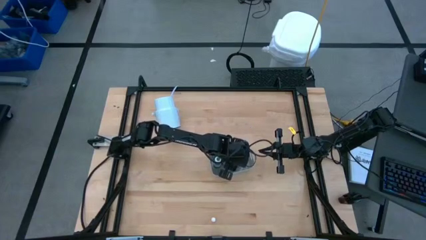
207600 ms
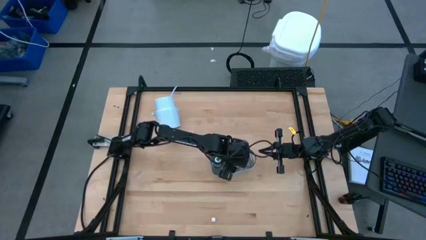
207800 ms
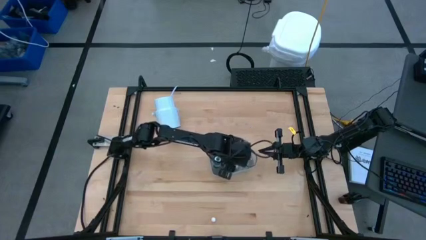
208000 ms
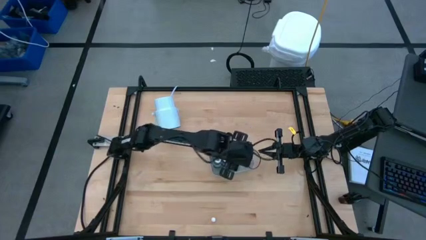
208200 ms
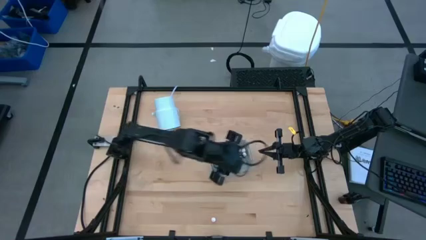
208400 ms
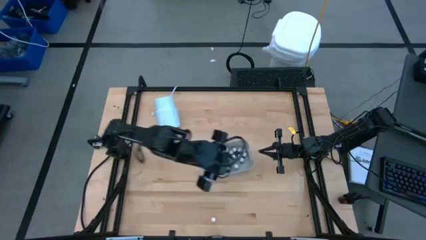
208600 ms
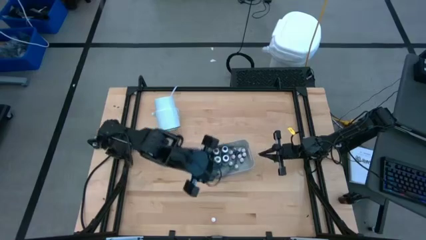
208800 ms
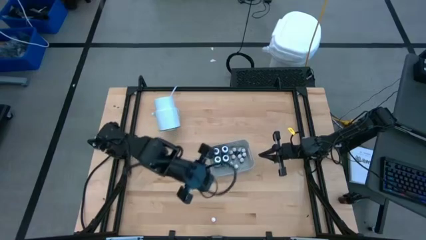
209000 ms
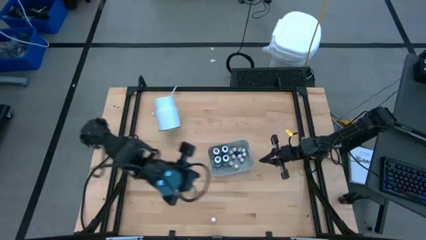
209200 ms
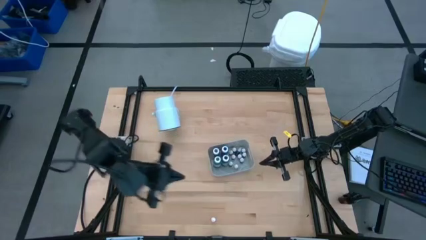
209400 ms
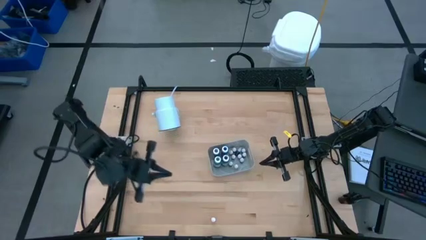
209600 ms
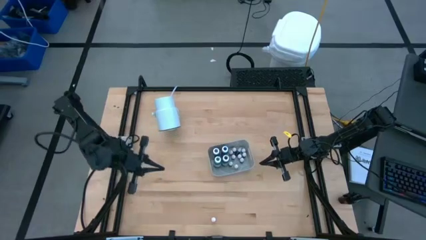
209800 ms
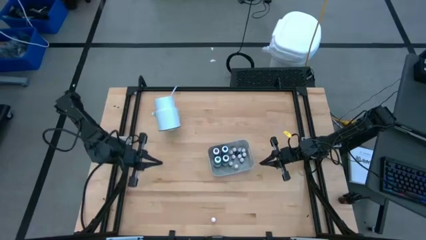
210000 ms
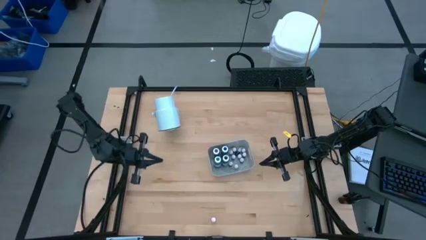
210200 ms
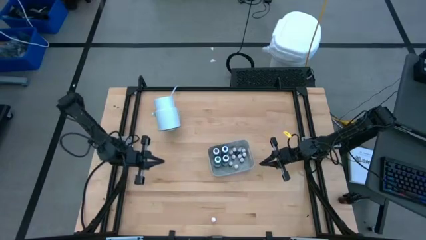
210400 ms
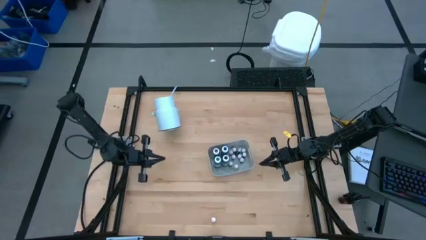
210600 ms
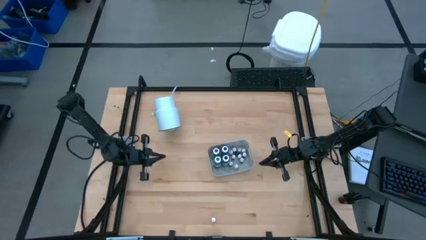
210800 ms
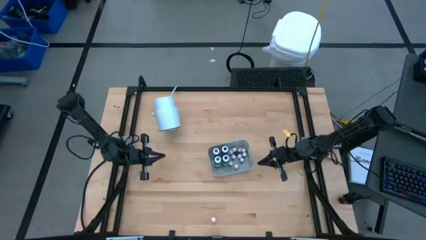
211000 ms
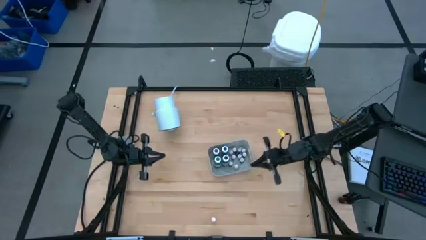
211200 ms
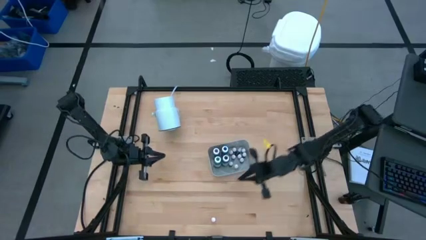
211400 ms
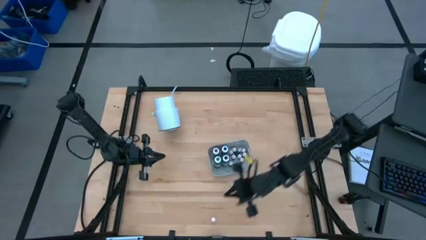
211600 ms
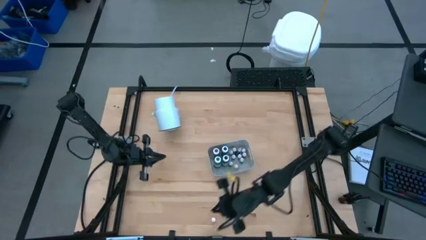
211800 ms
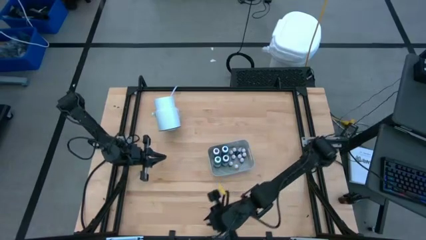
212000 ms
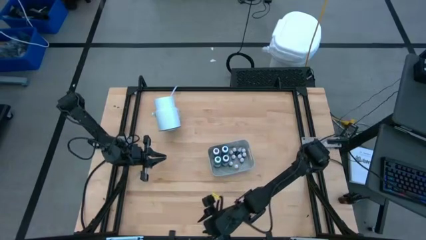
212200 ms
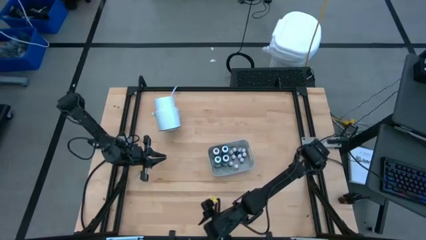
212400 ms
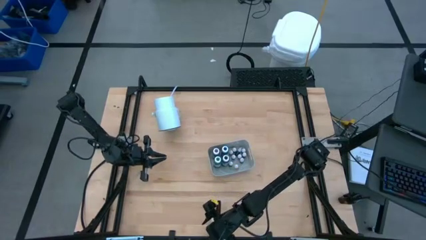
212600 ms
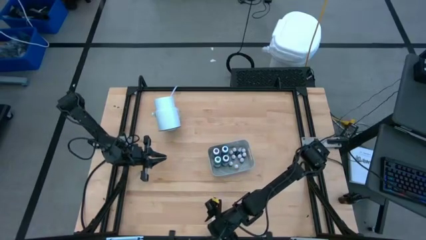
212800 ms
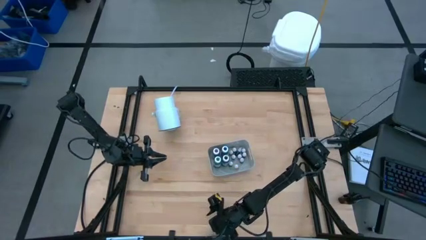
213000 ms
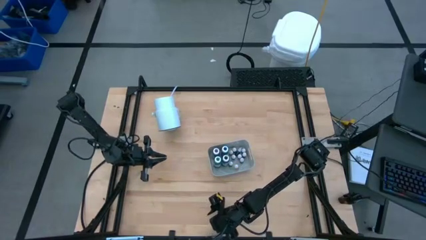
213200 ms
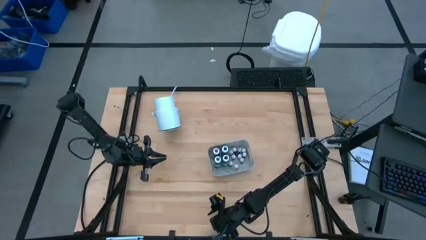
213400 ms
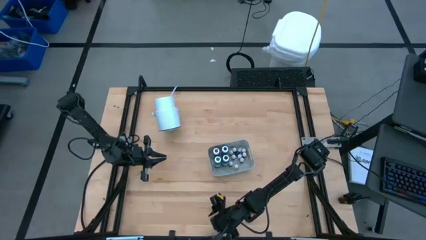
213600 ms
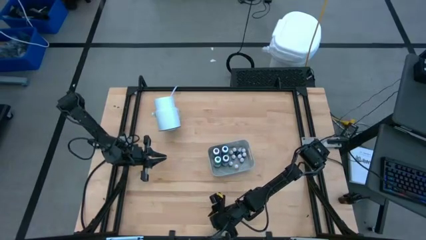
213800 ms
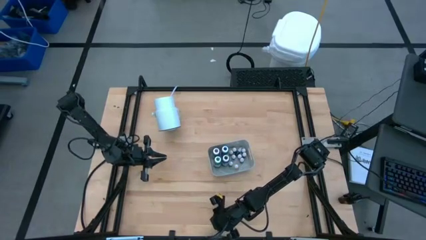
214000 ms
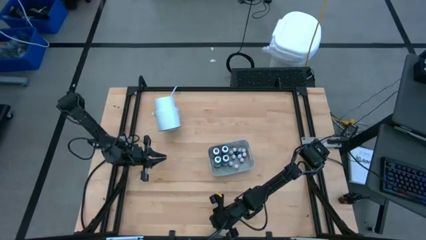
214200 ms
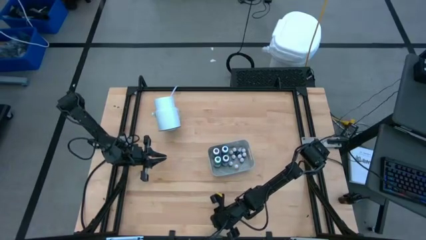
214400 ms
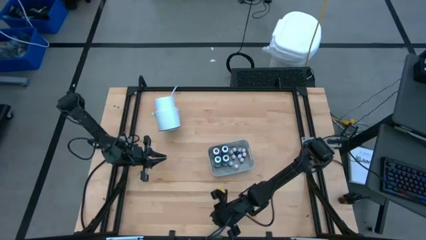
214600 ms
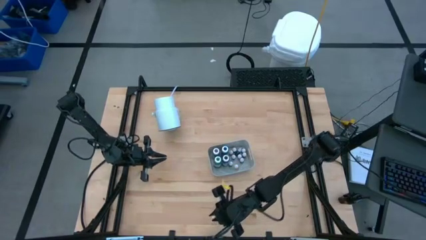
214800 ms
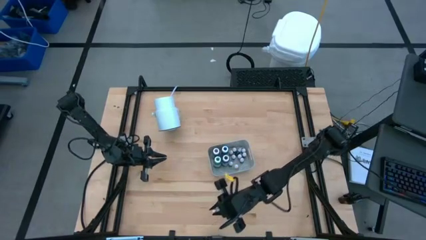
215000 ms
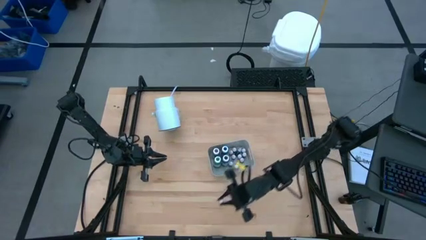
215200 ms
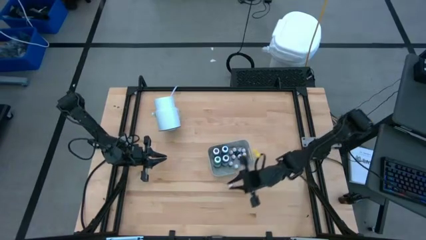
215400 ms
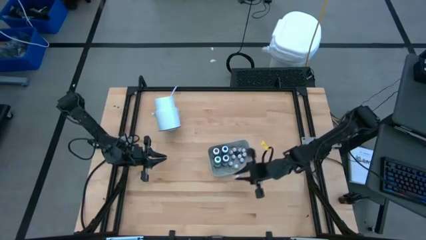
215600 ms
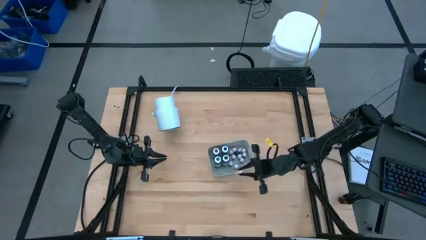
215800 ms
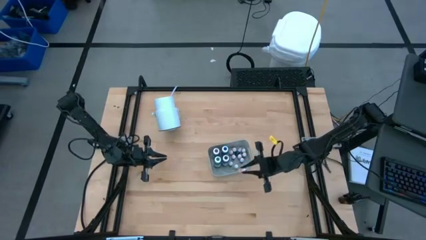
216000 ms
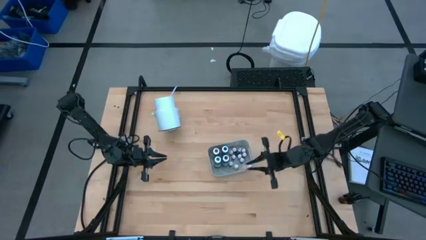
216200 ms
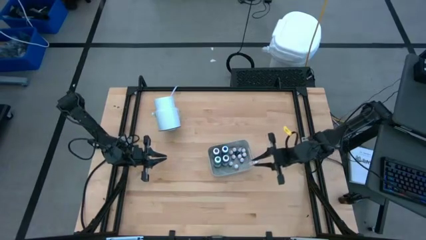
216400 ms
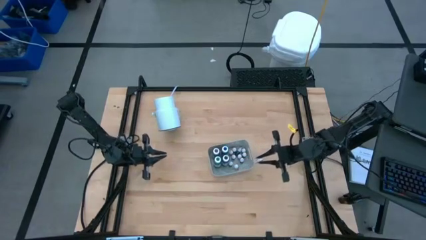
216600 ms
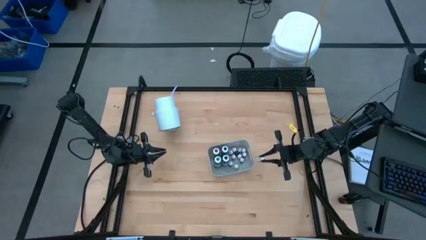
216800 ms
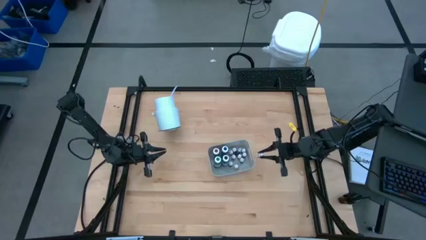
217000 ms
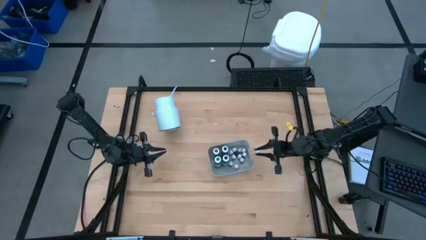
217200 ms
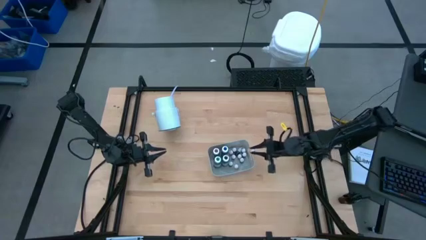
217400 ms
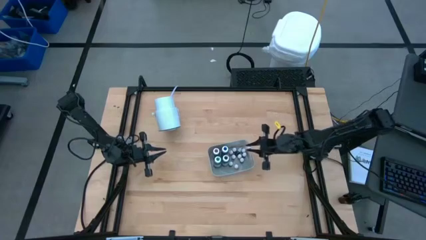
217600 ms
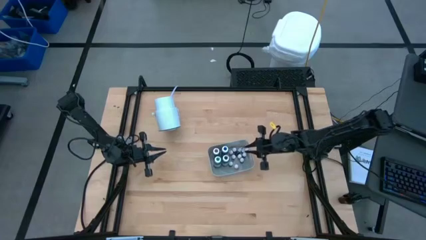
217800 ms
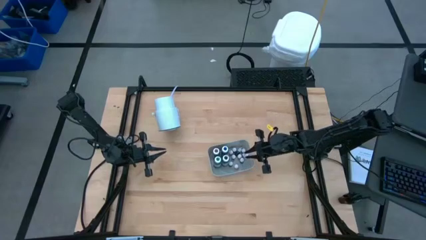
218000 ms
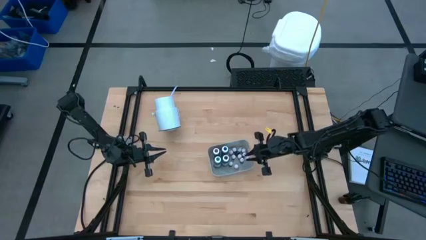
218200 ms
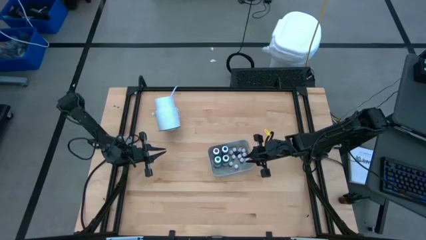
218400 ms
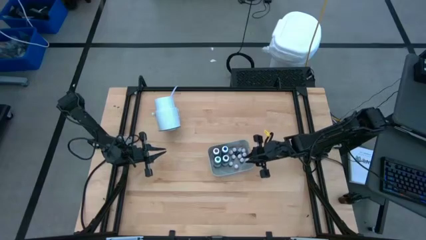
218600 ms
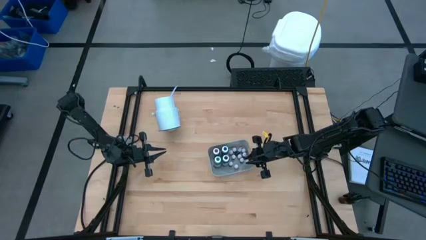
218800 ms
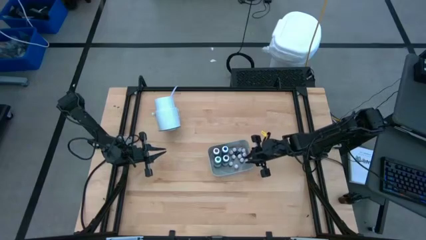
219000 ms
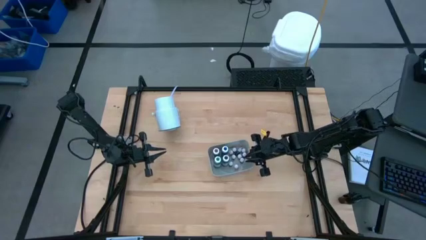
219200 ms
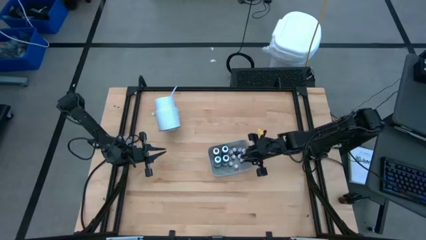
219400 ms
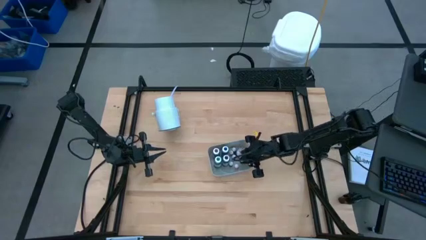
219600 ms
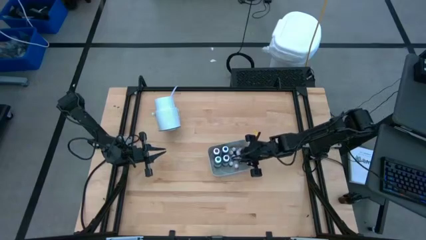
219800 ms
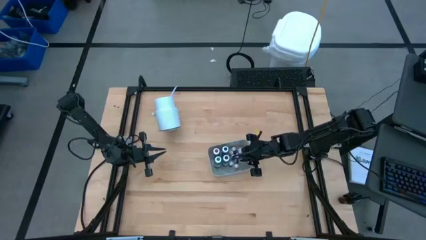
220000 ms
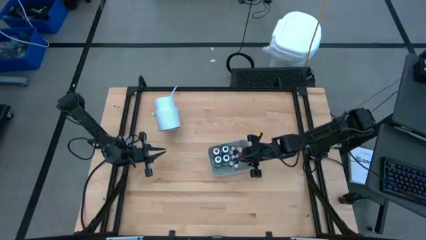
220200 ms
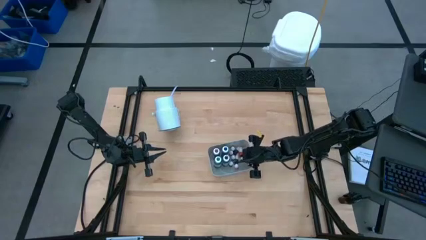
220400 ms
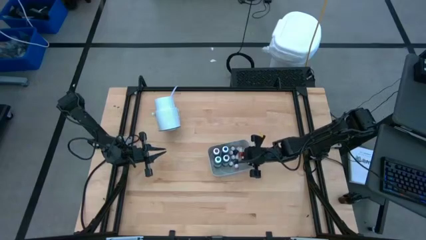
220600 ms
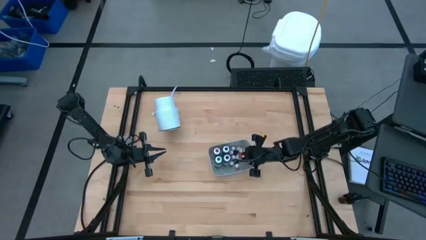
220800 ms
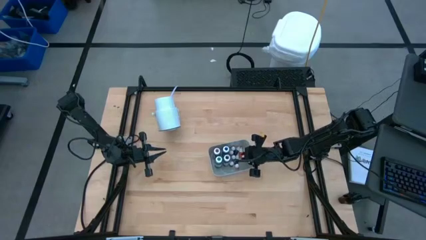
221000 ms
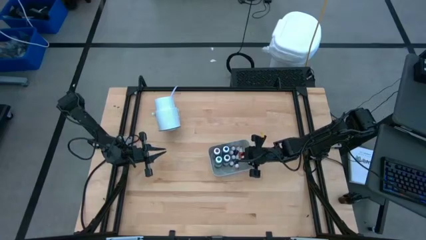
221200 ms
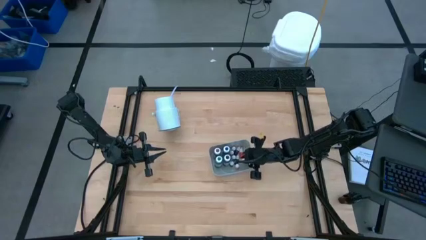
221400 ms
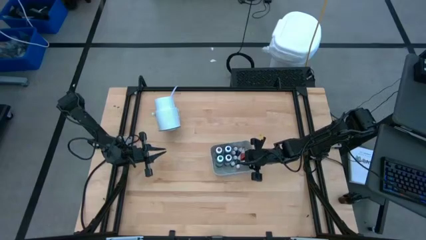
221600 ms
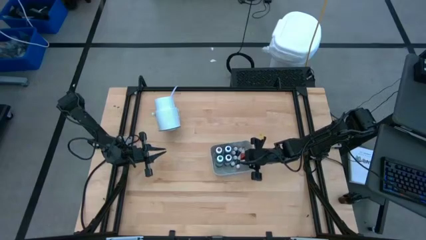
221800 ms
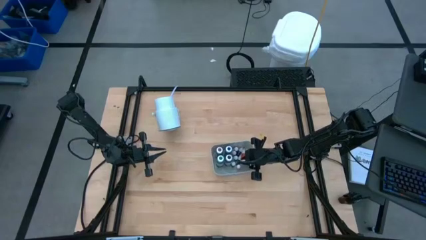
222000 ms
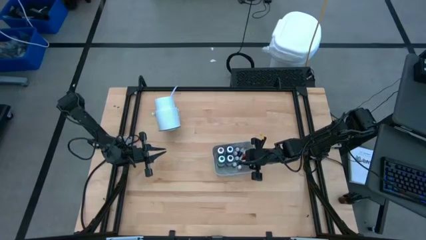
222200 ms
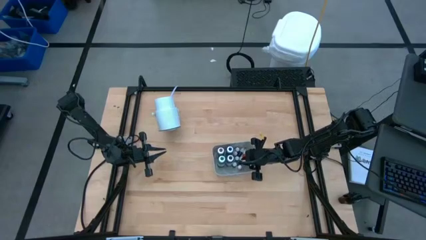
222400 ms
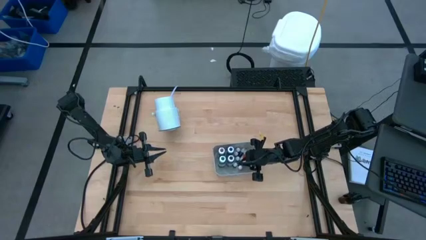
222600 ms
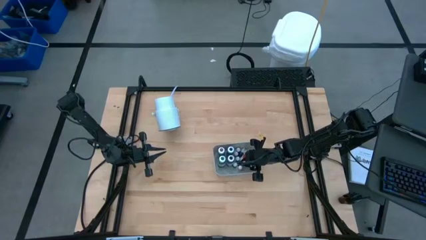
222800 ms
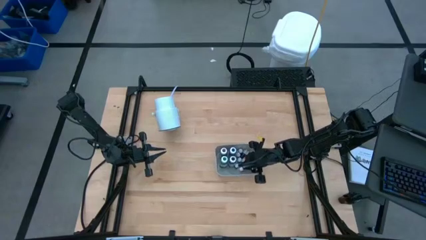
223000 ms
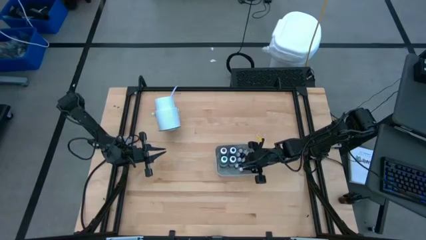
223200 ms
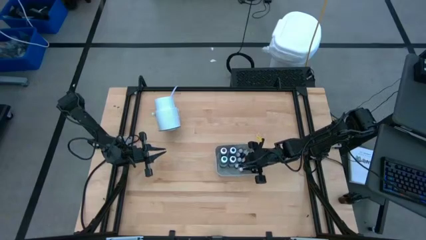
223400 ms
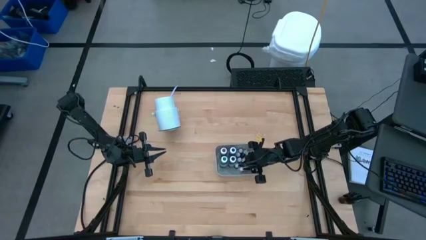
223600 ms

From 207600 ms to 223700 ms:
Task: Pick & Place food coloring
Put the small orange food coloring bottle into the bin

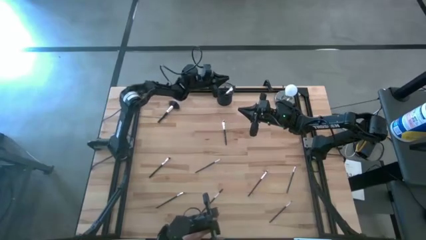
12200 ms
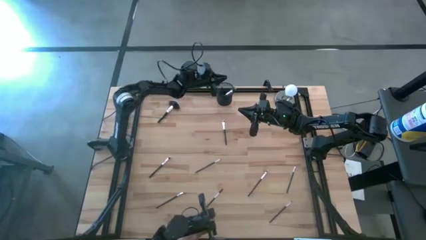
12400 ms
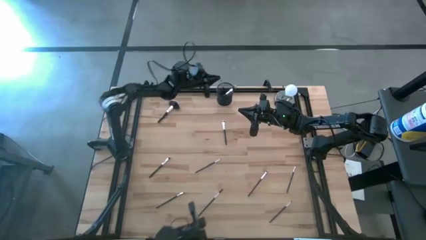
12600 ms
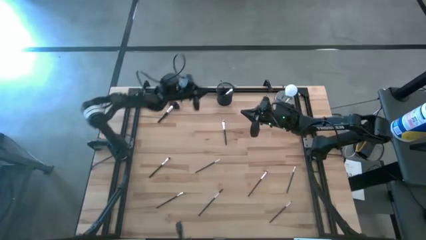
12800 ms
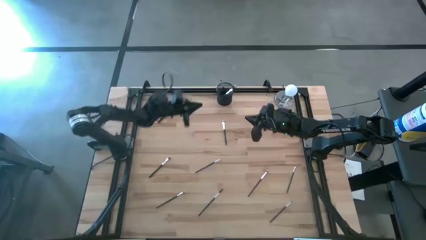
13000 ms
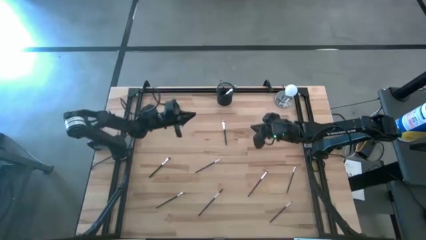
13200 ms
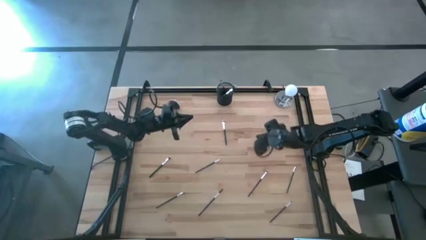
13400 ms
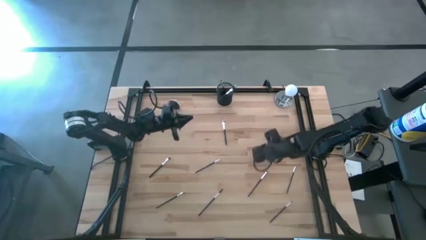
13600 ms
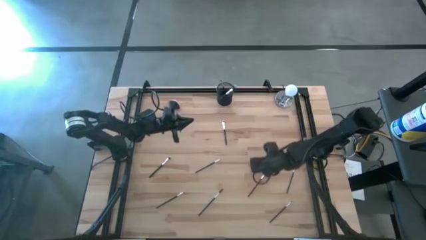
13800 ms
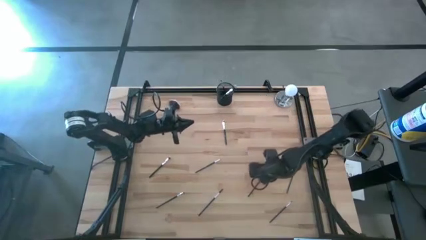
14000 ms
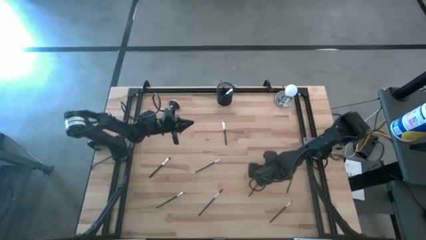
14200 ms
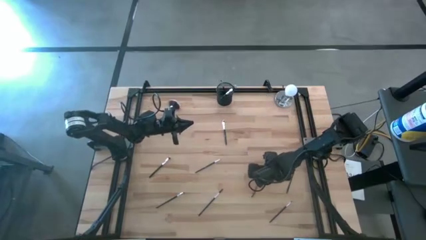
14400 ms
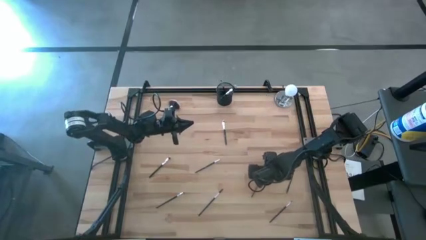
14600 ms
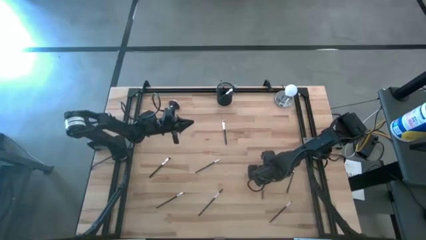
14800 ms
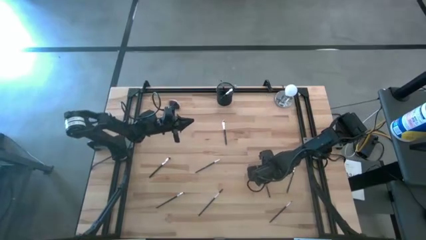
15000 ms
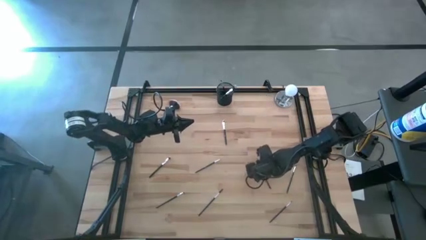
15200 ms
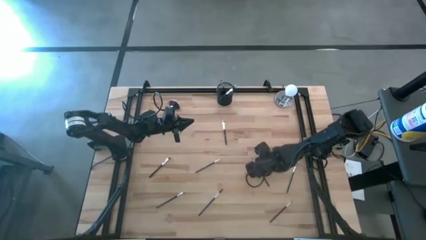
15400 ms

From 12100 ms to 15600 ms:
Task: Put items in baskets/containers
Put the black eyeshadow brush into the black pen holder
